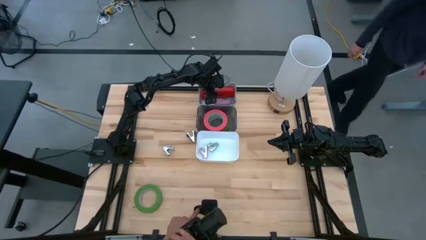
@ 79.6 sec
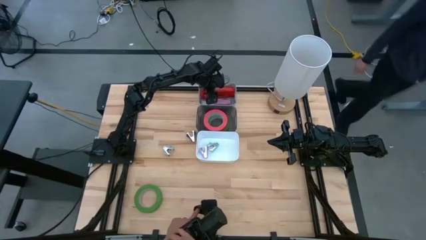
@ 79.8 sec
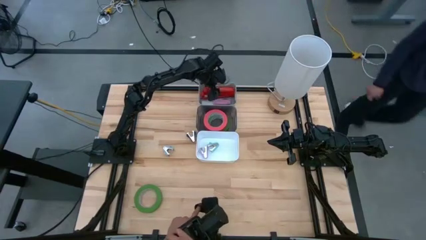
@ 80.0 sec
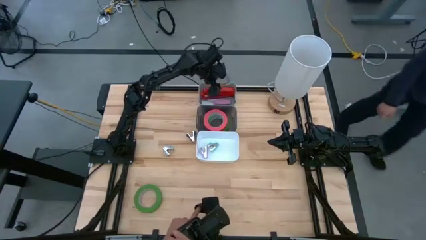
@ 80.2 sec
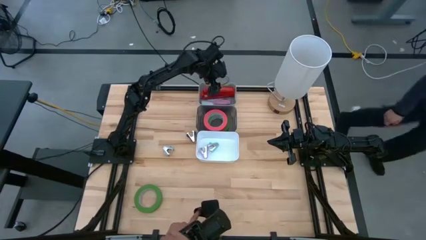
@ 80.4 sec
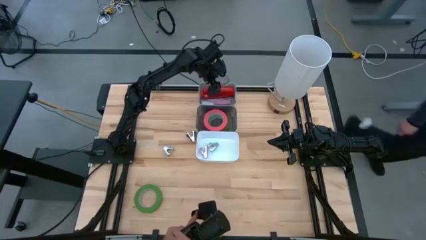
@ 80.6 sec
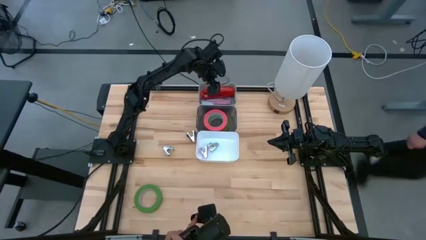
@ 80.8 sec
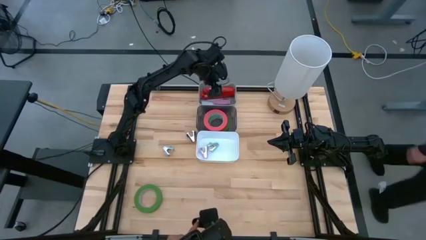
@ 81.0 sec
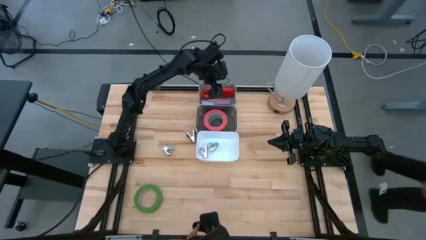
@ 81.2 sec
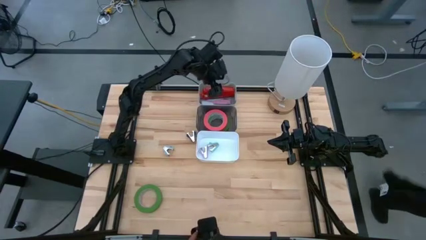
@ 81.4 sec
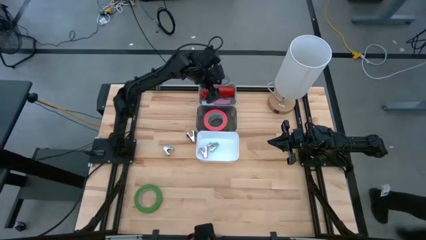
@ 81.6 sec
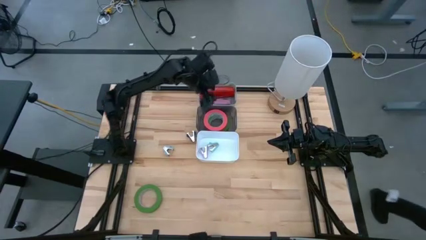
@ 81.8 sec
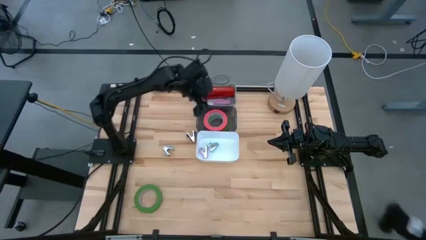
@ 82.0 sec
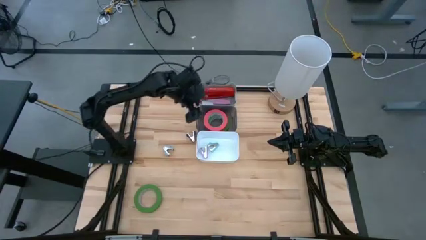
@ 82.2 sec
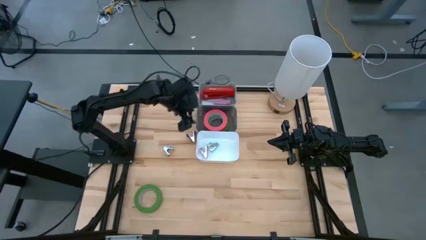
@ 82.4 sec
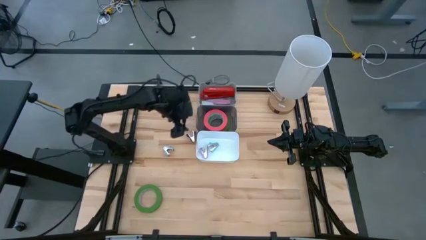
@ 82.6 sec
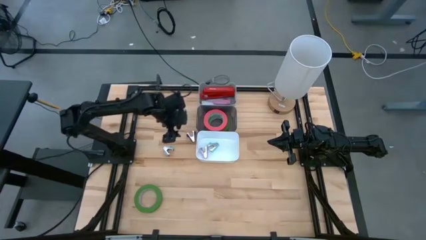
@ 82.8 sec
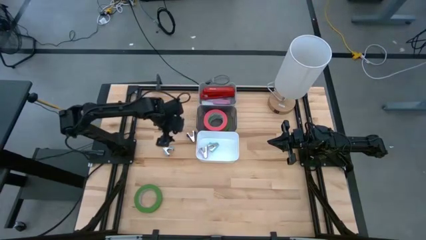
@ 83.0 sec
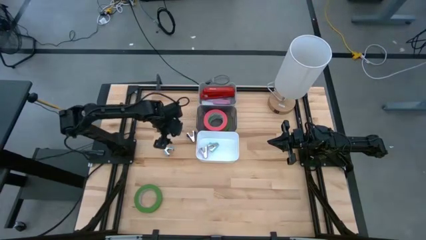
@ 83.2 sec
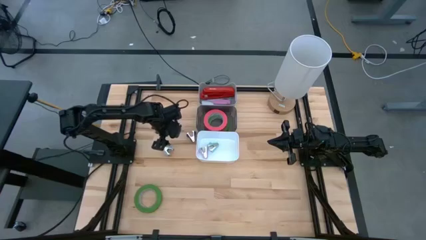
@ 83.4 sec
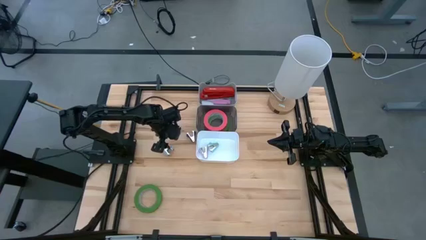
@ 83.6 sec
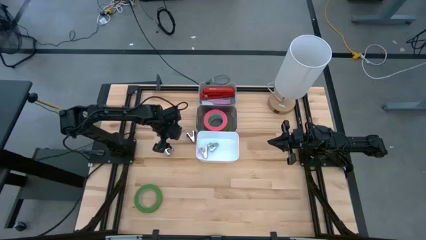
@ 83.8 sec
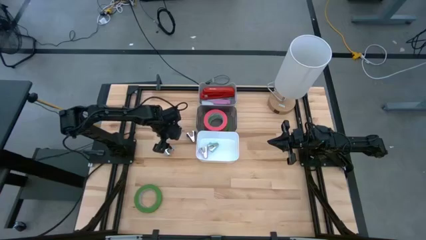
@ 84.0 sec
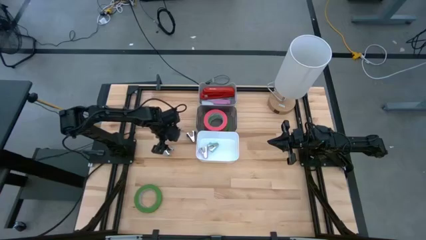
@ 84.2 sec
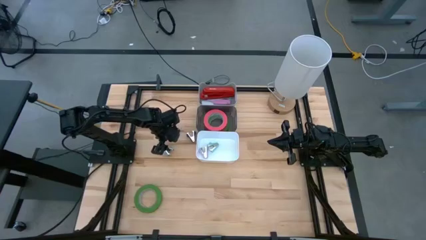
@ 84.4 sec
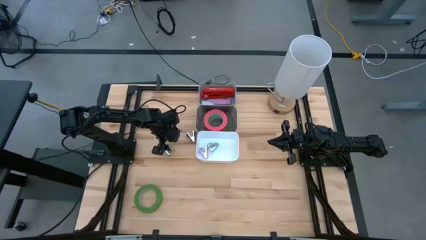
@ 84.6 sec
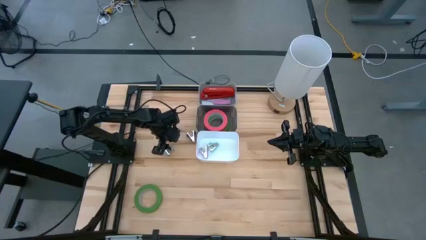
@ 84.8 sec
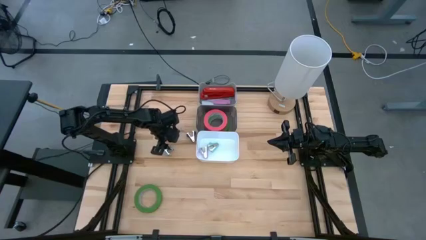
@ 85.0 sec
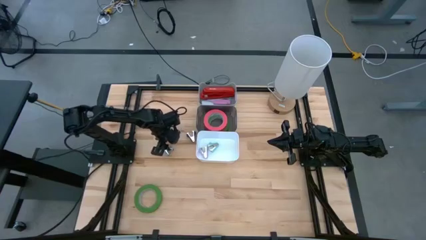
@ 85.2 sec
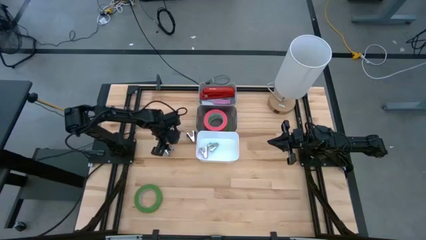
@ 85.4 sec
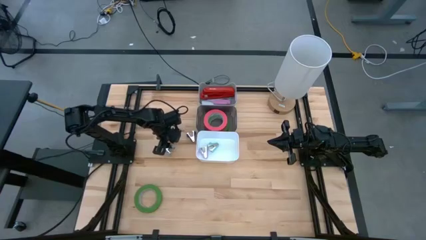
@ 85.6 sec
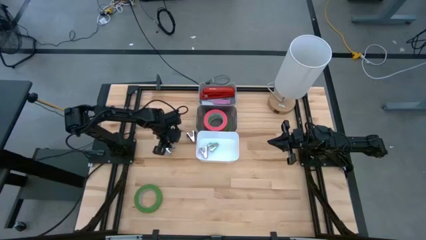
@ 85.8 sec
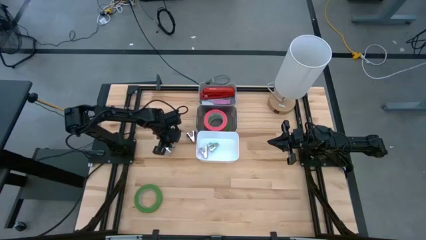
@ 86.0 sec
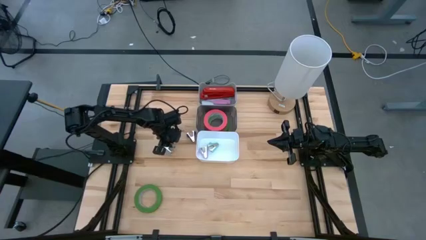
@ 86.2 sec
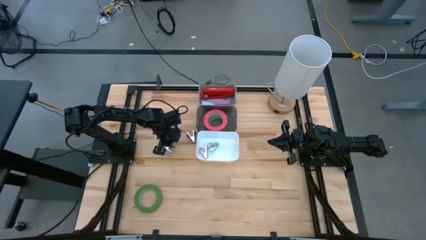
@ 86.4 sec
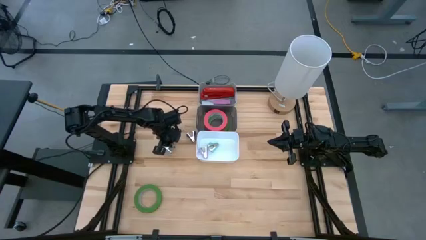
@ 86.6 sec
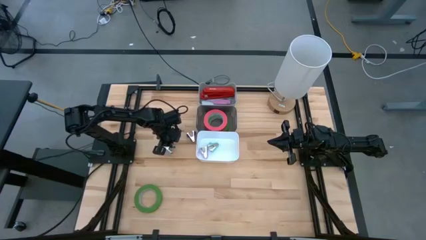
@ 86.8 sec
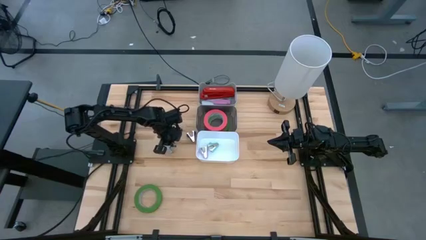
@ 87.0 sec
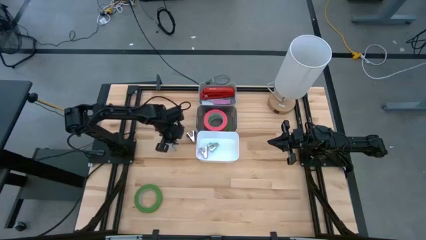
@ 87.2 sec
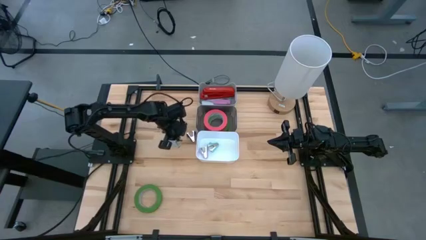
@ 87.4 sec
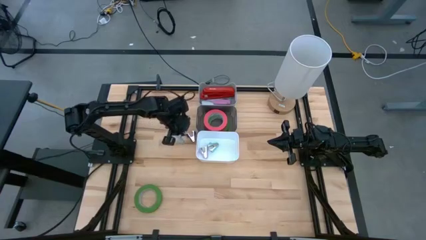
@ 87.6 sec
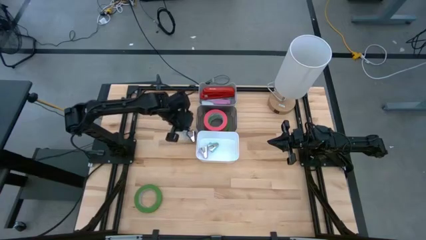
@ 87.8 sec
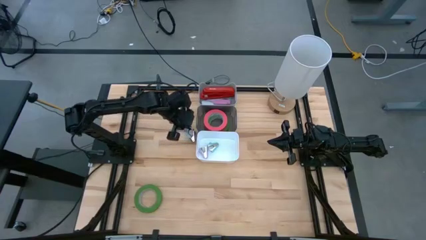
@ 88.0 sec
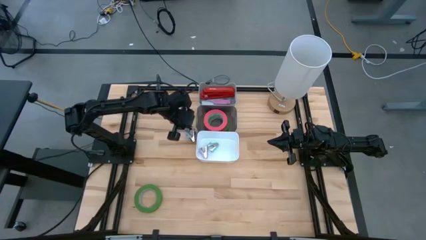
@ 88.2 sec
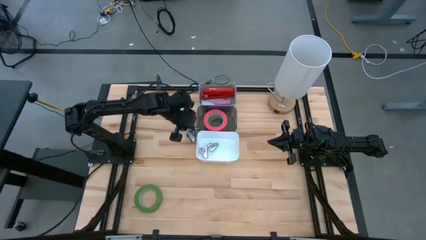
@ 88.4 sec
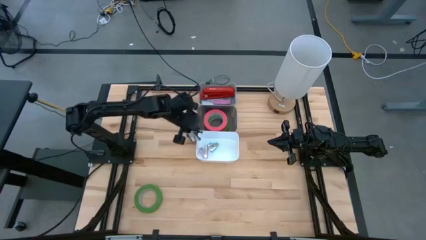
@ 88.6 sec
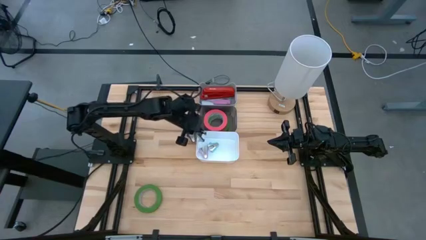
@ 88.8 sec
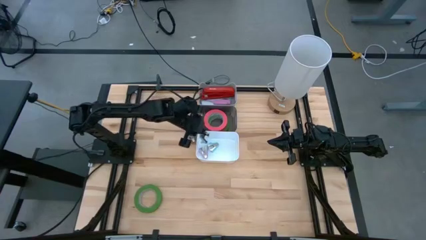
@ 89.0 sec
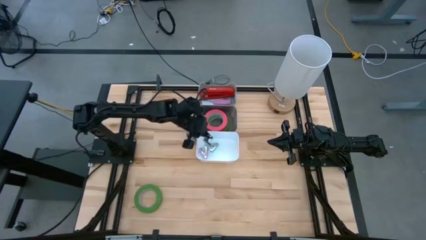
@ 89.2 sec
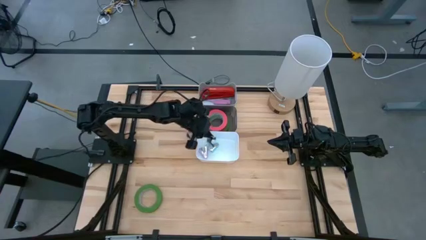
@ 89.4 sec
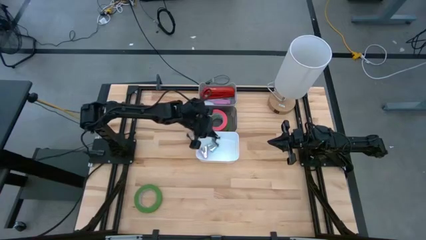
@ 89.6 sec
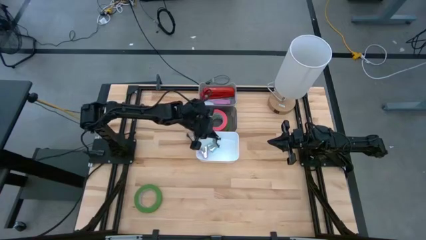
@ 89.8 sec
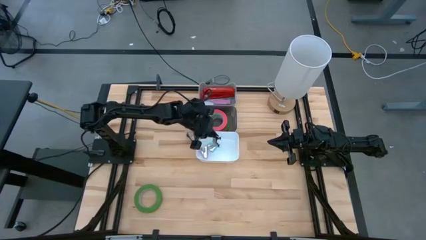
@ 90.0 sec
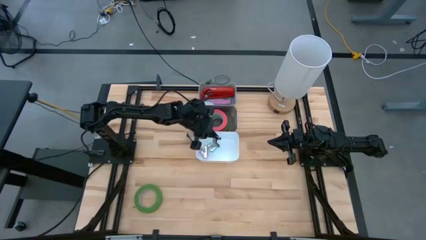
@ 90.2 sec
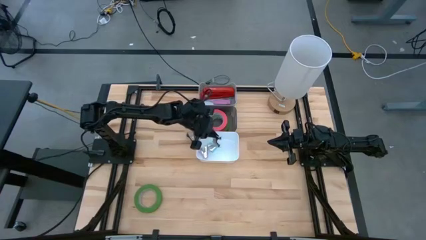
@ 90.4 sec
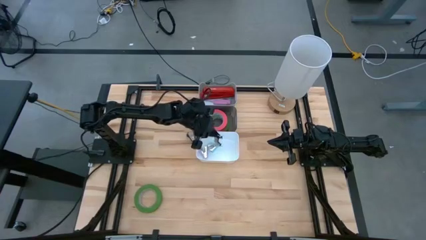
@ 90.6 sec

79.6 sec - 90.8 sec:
Task: Pick and place Stapler, Stapler remover, tape
Put the blue staple remover in the white bin
